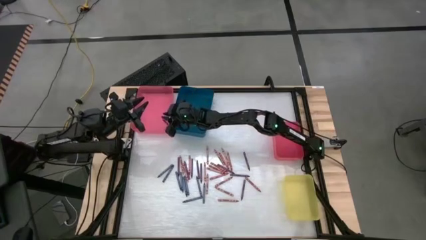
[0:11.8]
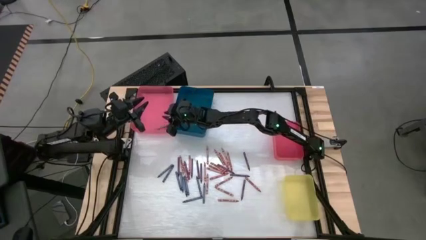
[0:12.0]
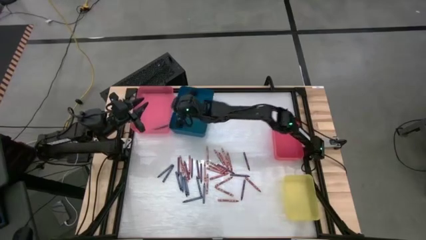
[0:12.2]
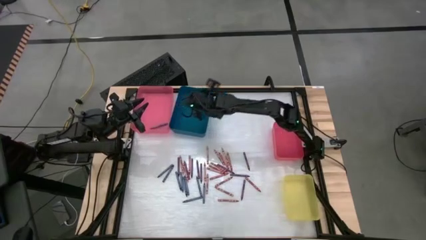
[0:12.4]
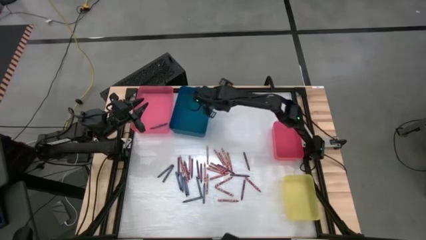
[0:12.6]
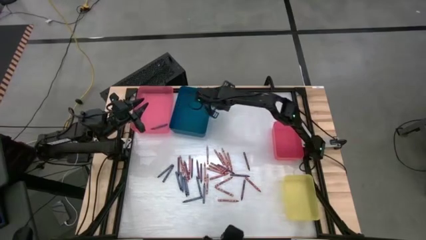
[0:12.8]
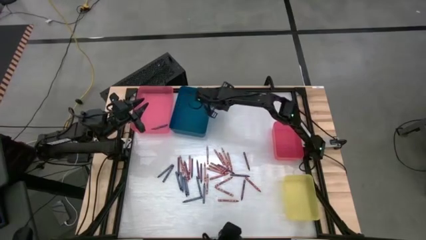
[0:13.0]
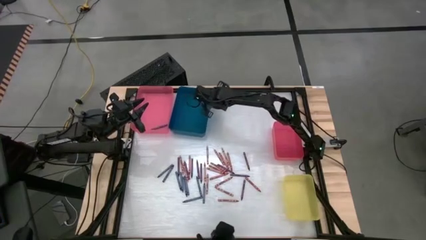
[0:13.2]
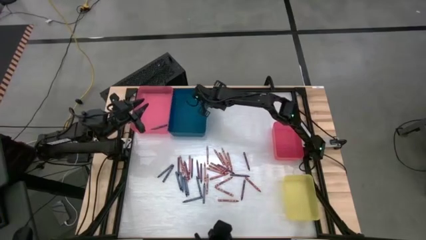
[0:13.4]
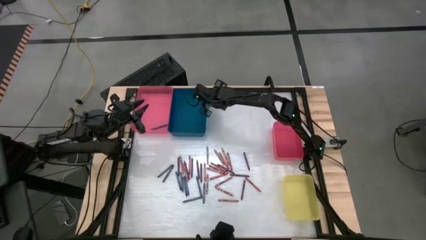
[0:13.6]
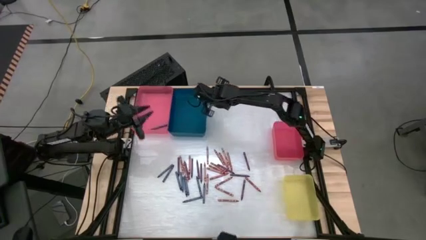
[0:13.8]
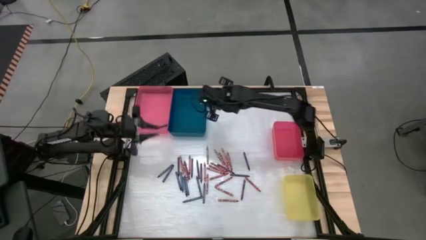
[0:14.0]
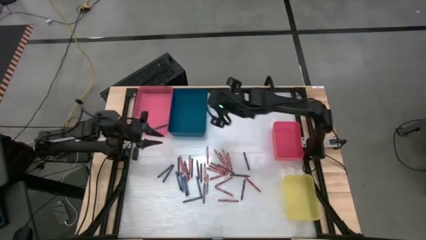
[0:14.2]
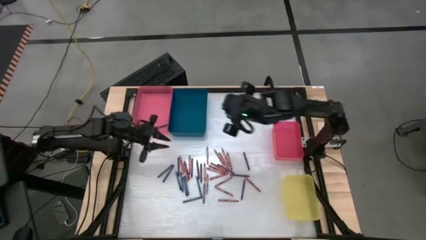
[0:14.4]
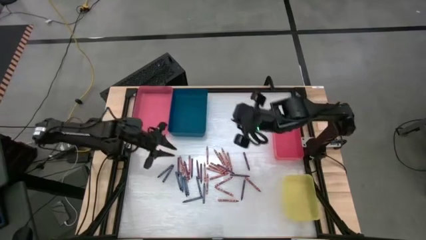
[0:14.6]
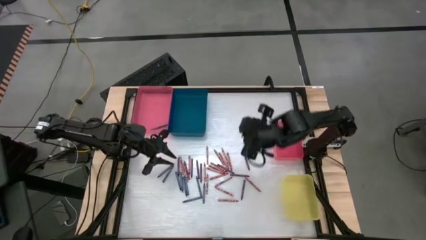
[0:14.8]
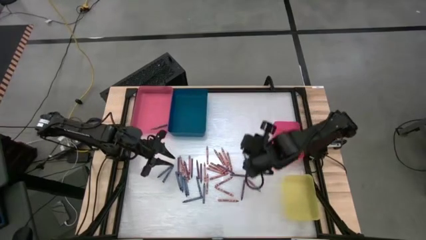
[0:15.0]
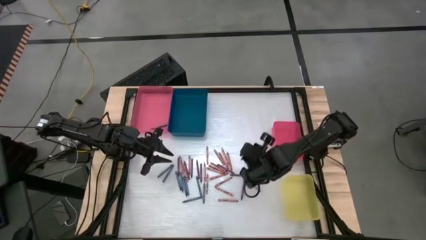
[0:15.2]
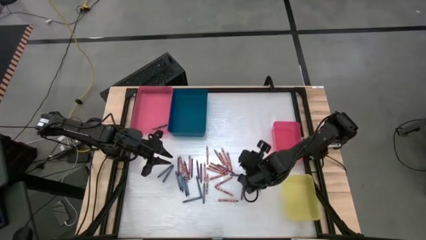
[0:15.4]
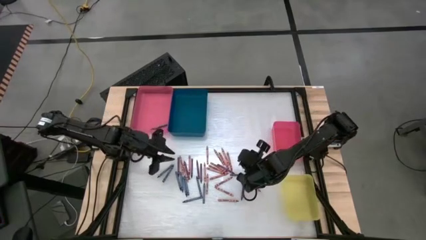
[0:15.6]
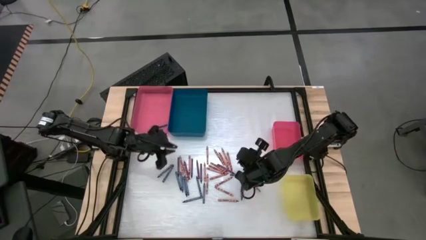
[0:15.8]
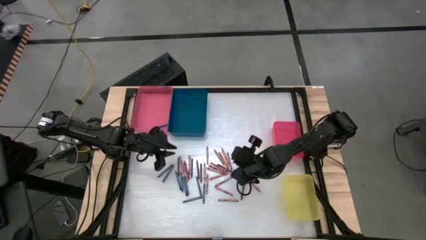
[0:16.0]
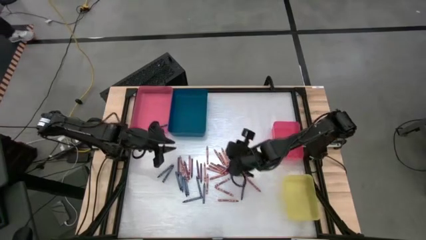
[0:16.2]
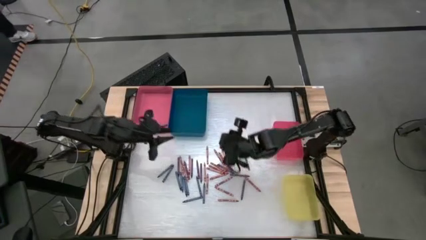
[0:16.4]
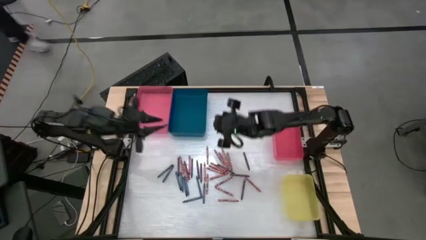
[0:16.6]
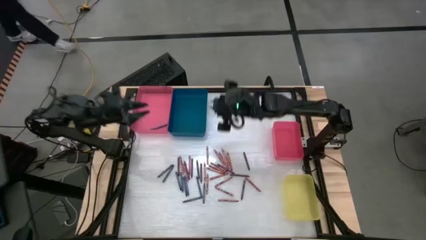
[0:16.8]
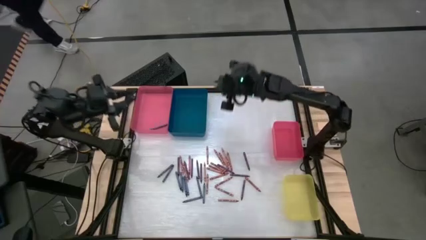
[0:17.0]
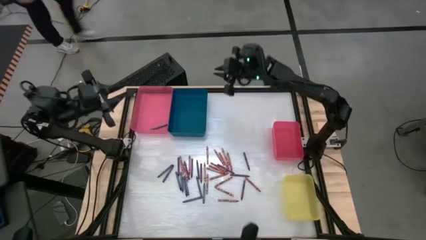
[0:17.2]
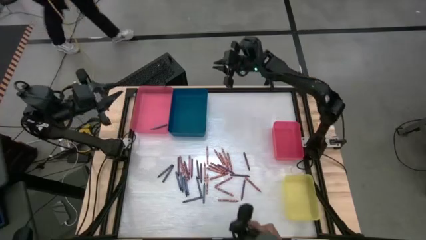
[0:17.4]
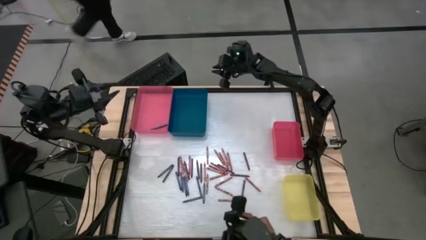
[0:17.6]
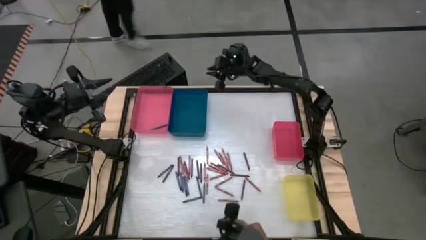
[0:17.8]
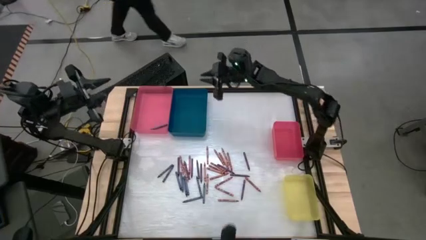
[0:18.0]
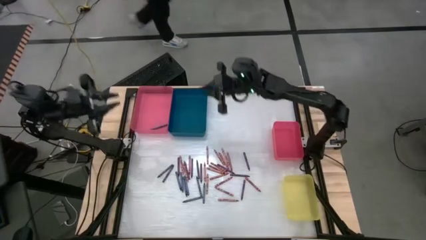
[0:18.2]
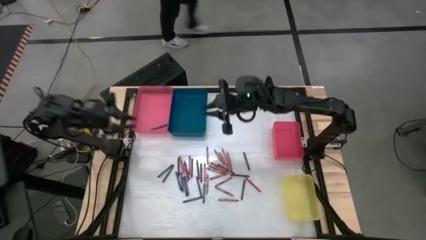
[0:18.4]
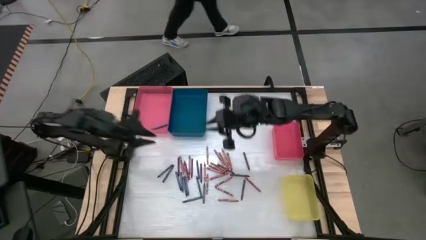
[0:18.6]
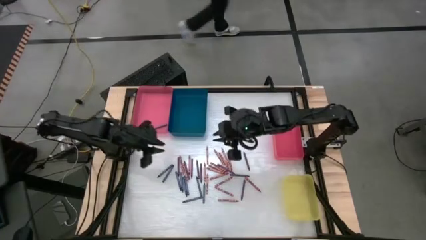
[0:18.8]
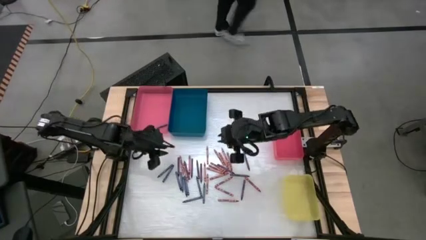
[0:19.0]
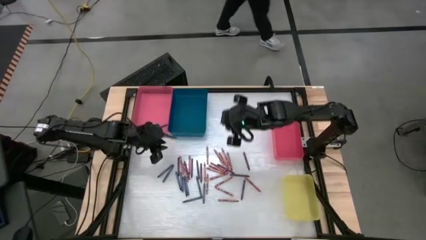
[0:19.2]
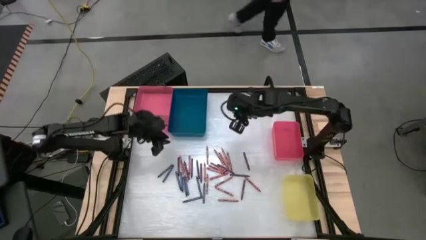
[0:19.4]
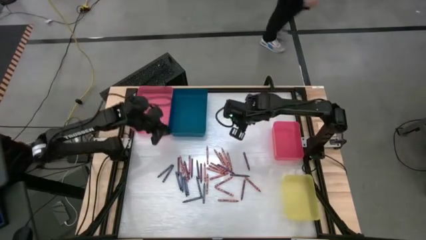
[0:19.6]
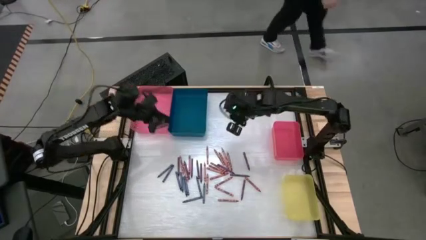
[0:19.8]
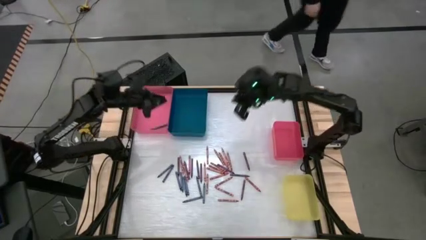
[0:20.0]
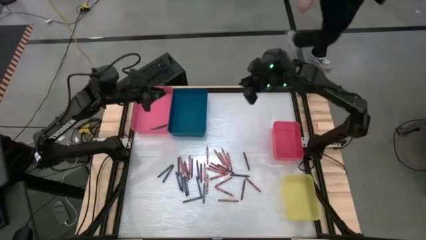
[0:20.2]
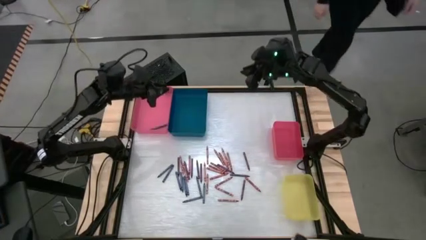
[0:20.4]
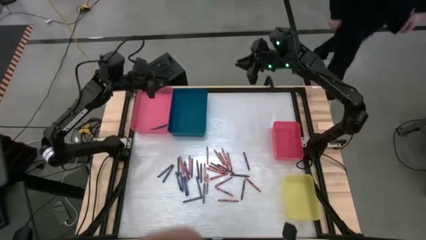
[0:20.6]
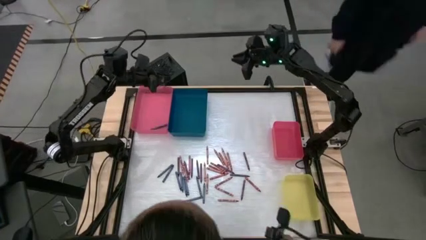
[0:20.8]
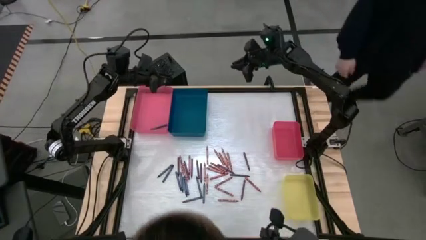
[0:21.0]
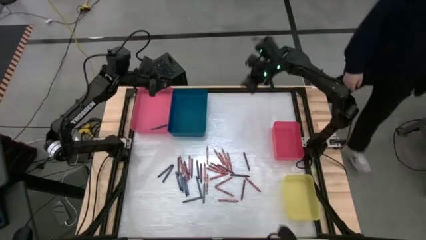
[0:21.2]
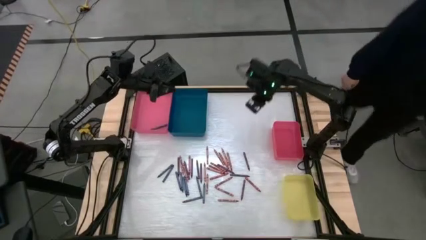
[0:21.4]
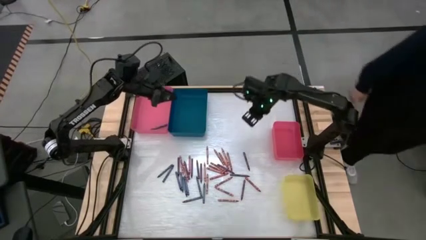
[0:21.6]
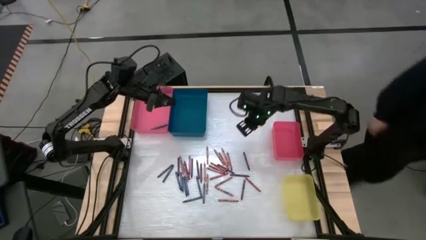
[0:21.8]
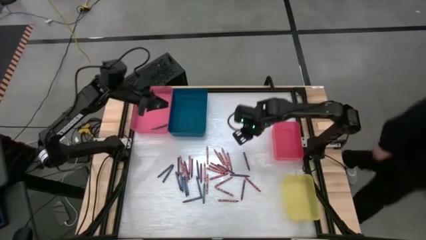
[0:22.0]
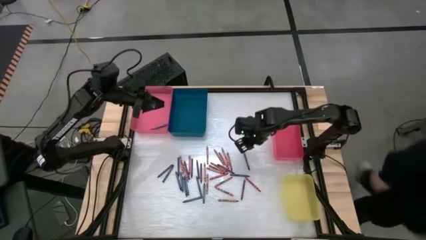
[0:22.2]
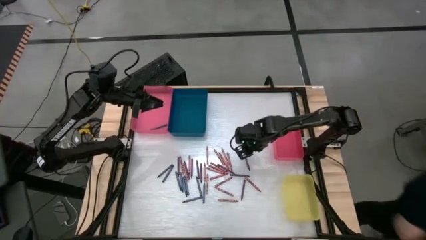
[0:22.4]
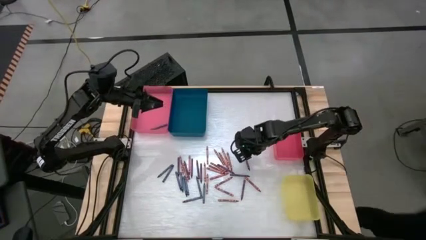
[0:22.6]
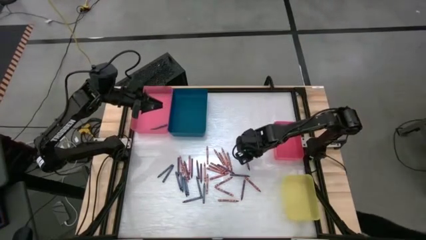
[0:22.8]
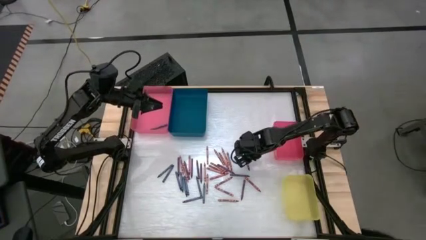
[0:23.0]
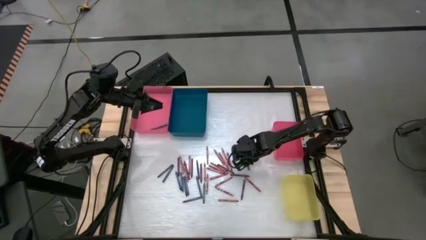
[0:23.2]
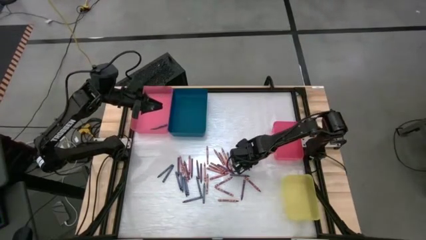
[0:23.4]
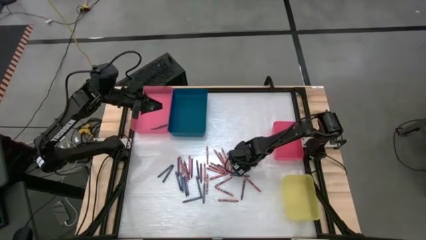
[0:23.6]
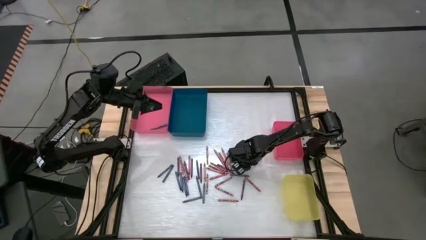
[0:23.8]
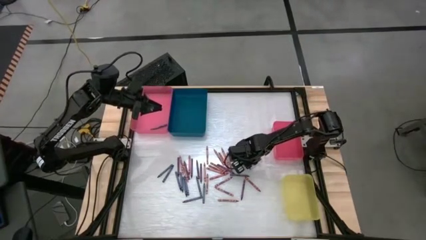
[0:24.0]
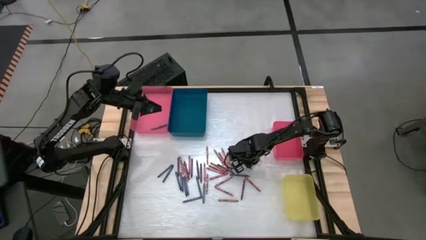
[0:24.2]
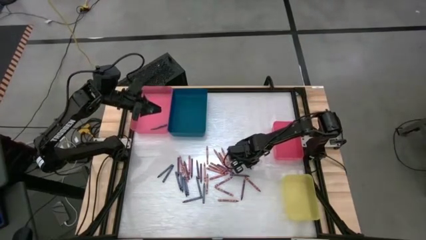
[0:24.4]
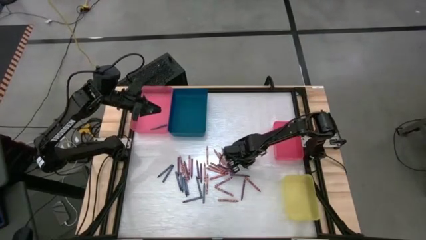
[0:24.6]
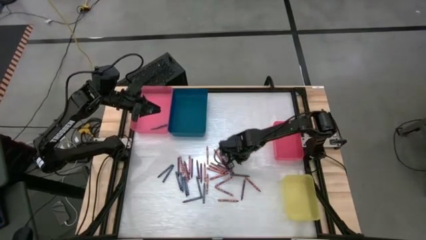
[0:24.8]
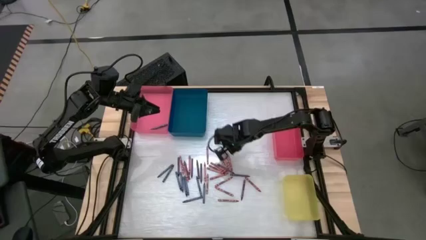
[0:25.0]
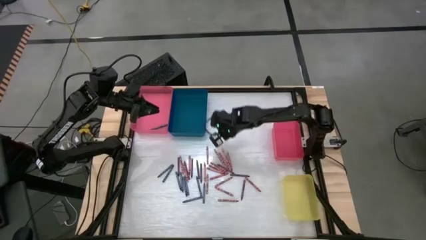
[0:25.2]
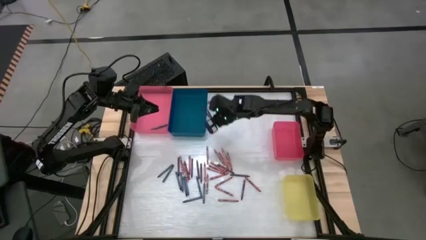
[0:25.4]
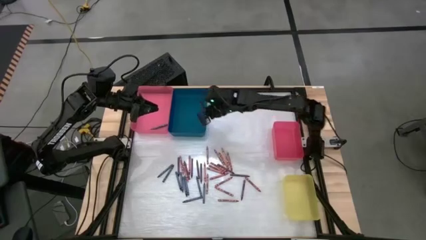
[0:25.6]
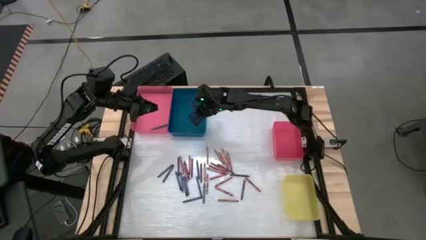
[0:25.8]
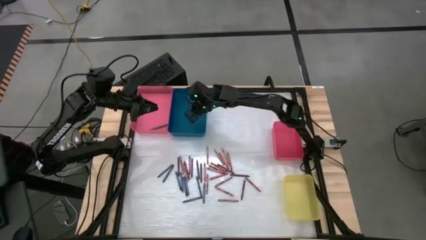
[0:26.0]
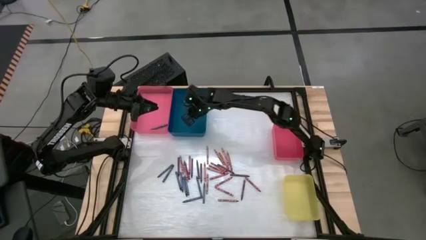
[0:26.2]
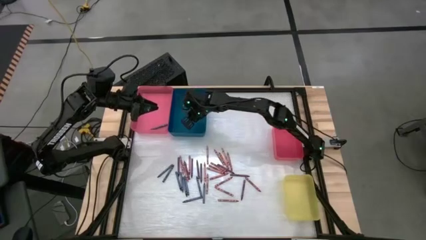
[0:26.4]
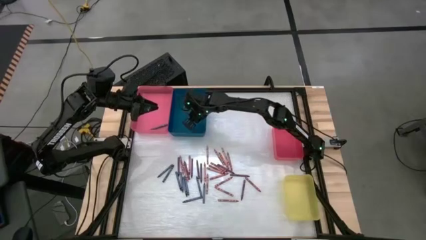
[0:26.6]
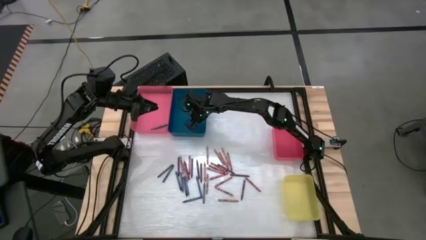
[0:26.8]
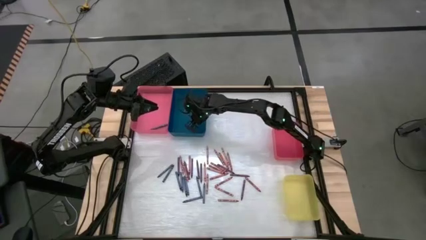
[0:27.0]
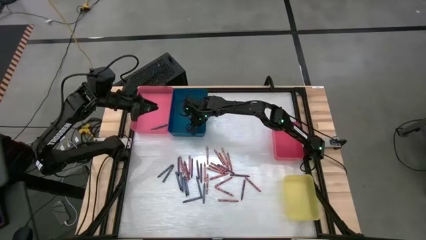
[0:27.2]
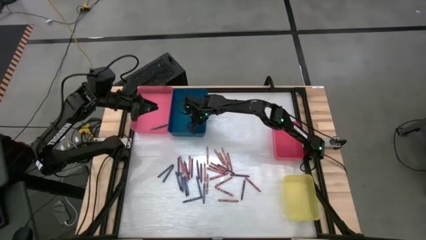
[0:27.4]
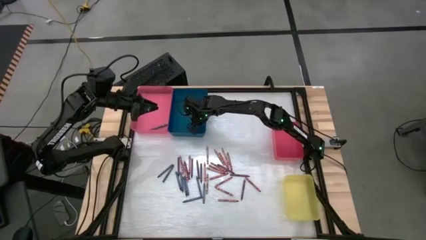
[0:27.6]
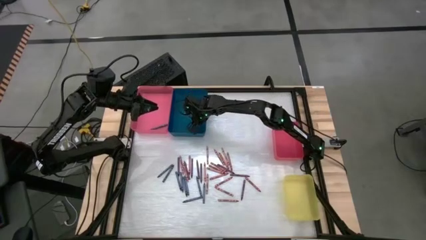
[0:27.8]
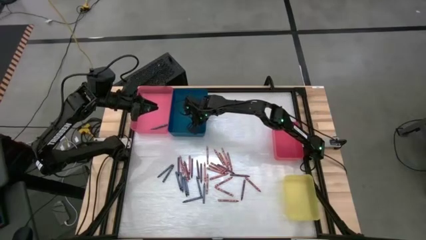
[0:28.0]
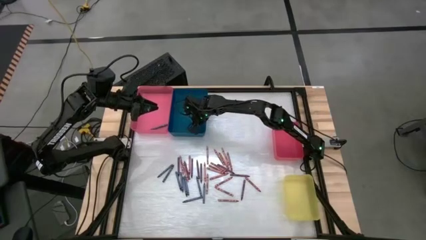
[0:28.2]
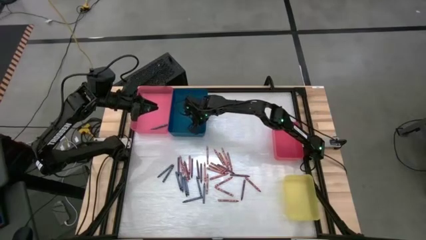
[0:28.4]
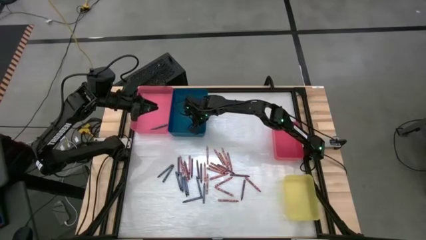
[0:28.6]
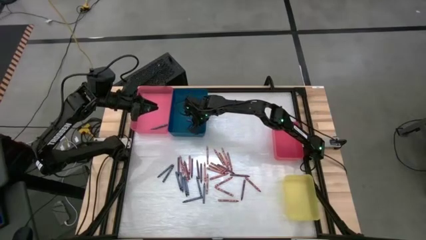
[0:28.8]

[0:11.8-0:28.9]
Task: Sort crayons
Put the purple crayon into the blue bin
